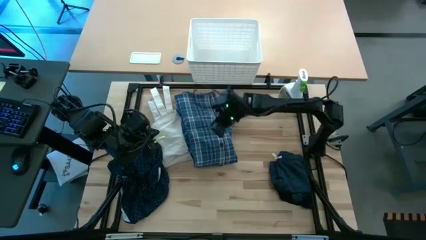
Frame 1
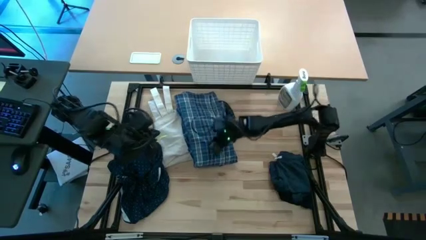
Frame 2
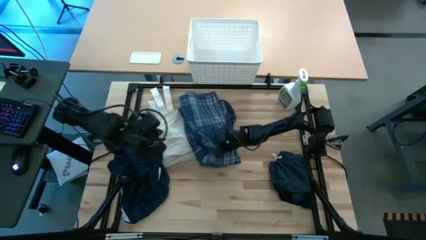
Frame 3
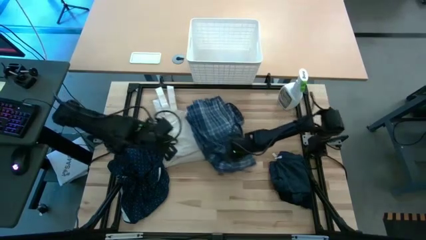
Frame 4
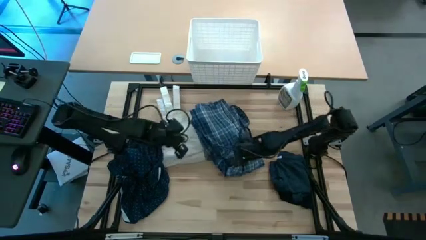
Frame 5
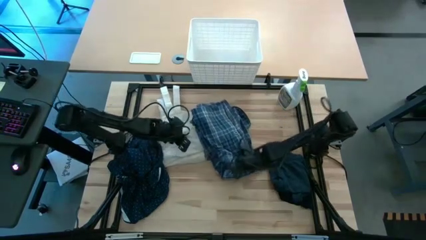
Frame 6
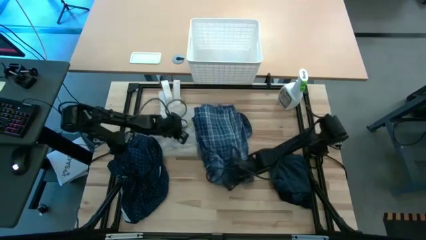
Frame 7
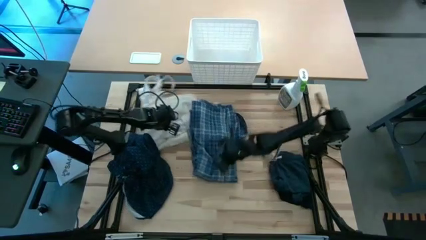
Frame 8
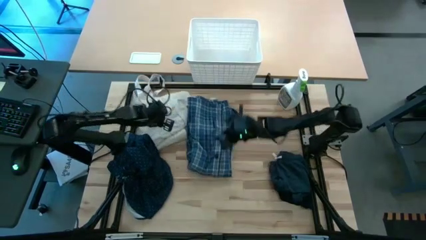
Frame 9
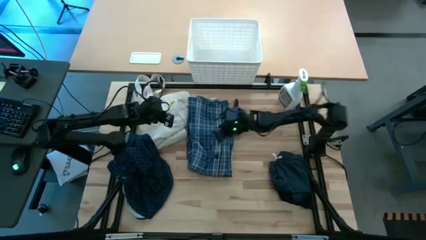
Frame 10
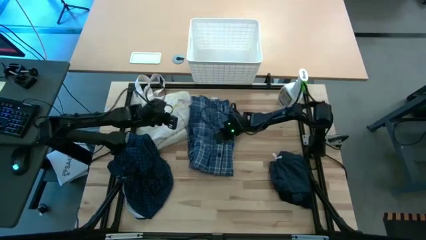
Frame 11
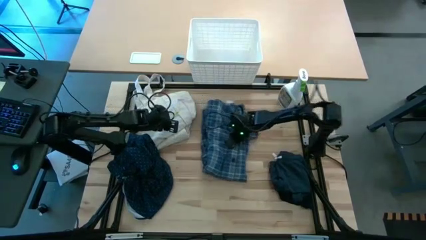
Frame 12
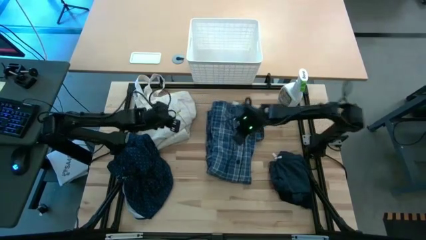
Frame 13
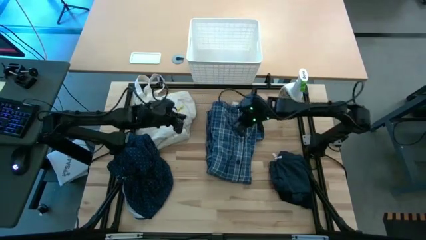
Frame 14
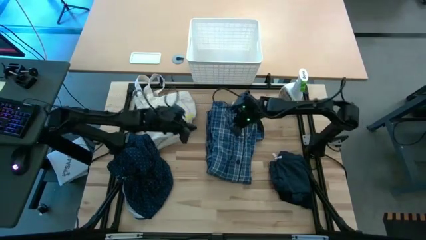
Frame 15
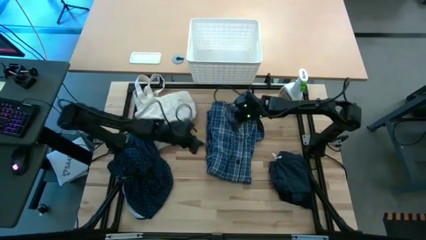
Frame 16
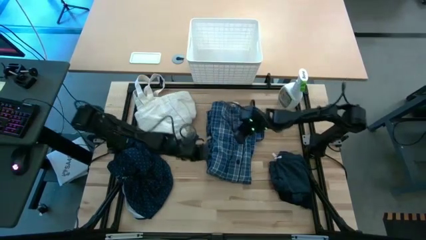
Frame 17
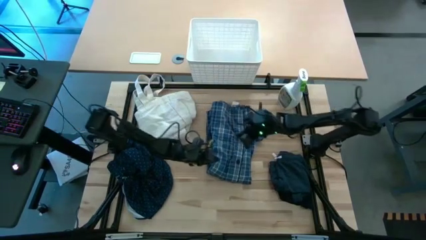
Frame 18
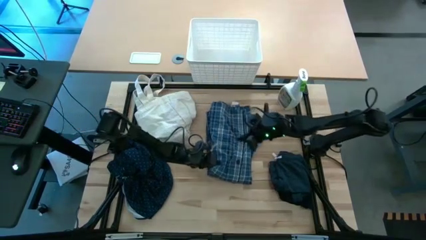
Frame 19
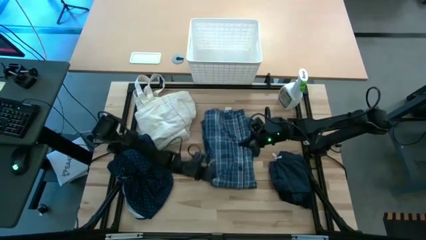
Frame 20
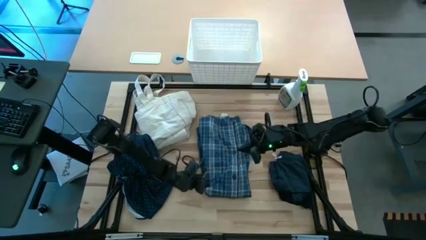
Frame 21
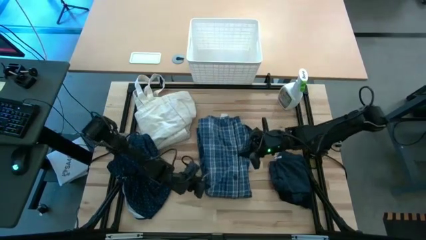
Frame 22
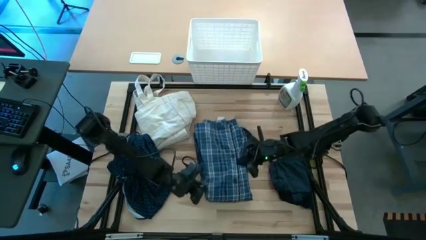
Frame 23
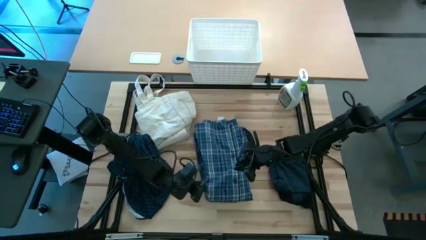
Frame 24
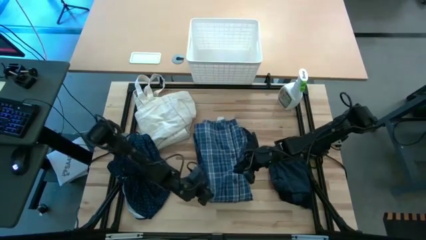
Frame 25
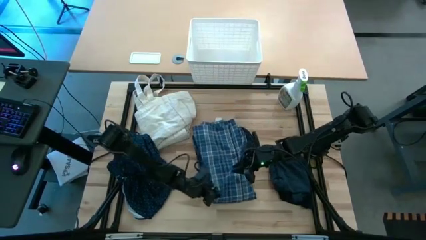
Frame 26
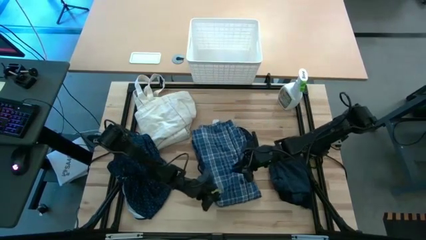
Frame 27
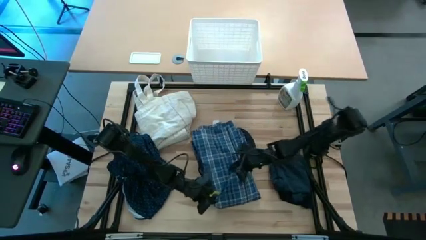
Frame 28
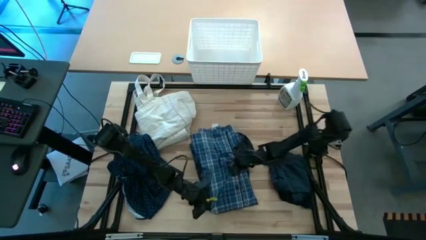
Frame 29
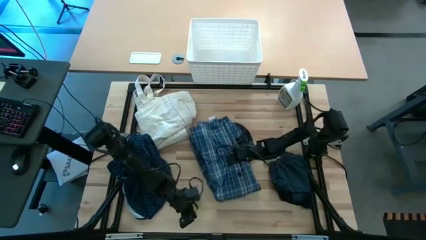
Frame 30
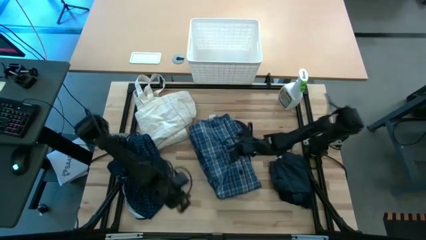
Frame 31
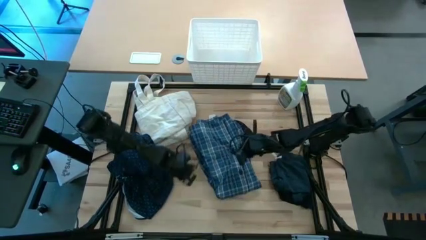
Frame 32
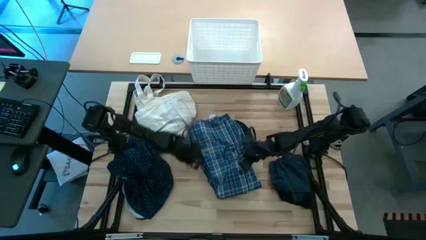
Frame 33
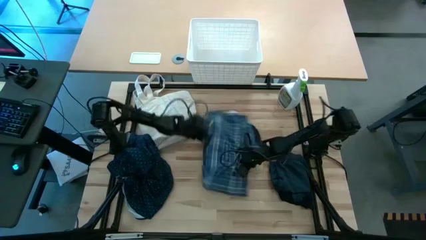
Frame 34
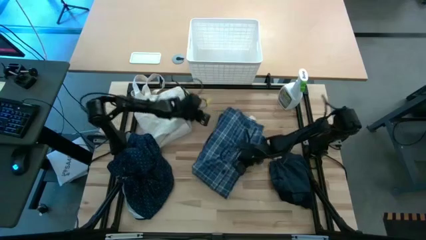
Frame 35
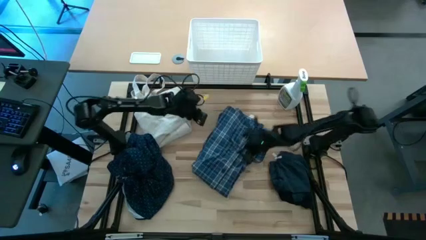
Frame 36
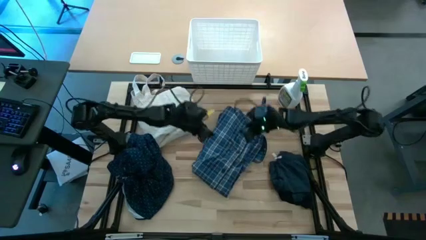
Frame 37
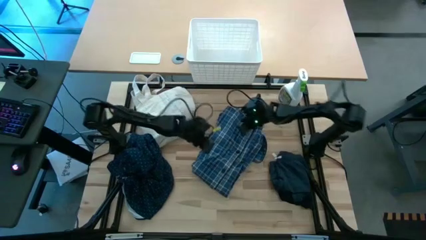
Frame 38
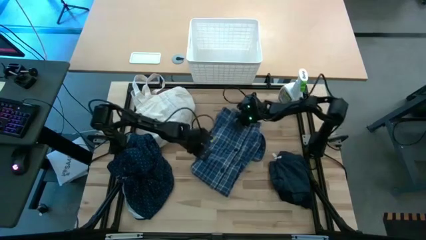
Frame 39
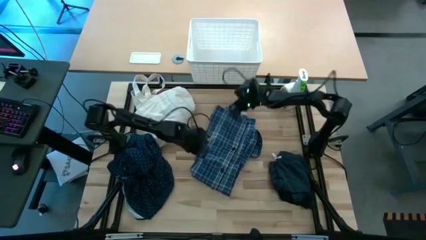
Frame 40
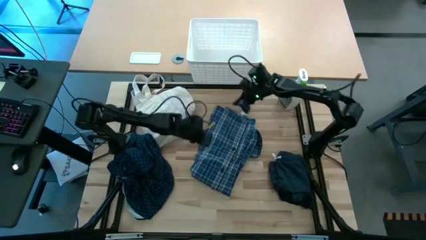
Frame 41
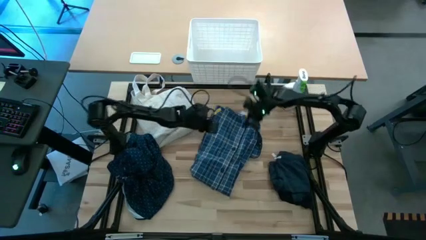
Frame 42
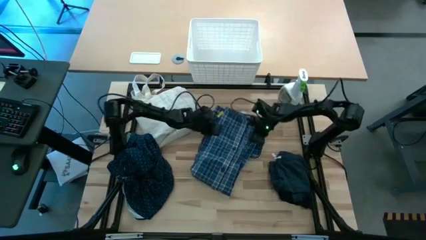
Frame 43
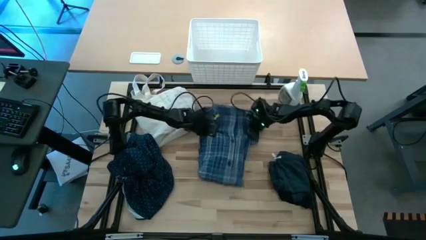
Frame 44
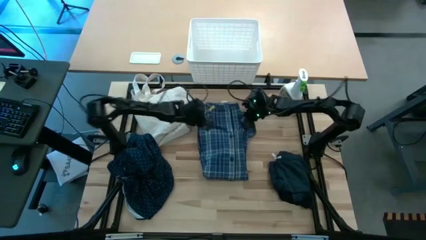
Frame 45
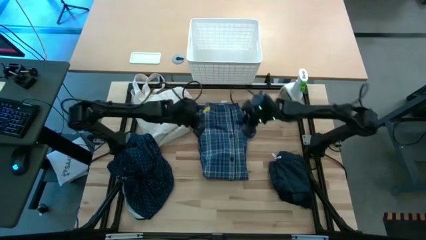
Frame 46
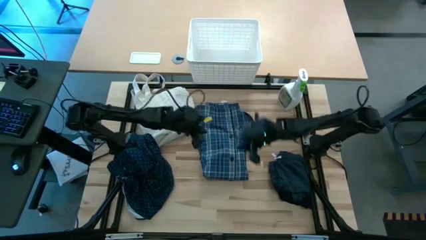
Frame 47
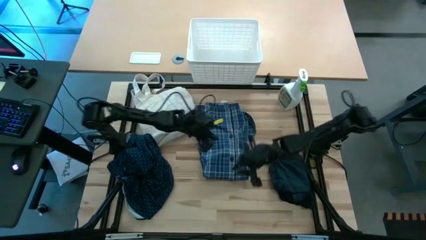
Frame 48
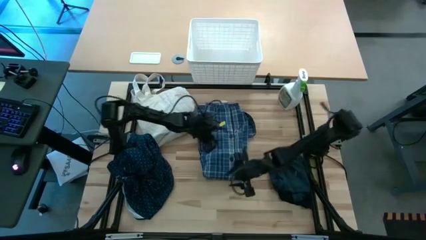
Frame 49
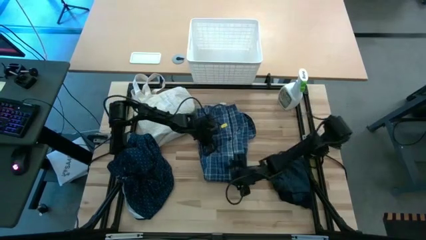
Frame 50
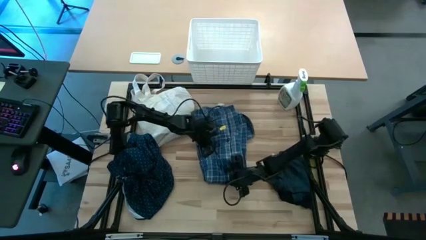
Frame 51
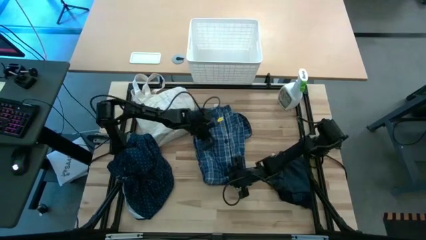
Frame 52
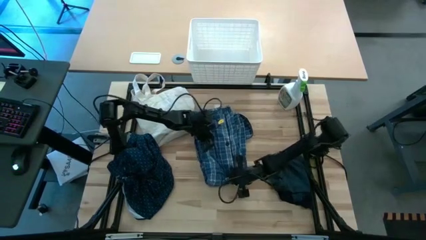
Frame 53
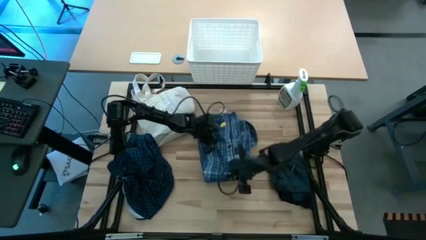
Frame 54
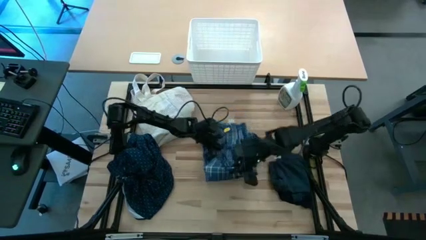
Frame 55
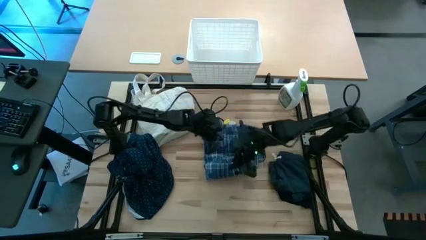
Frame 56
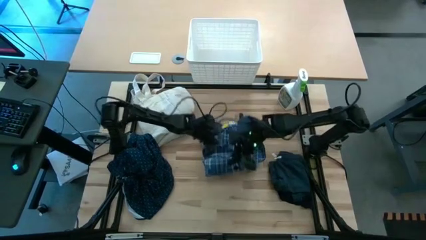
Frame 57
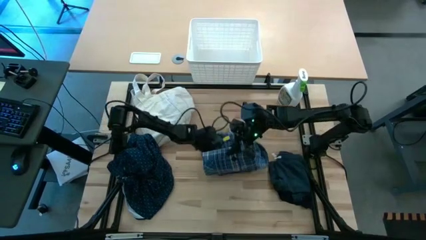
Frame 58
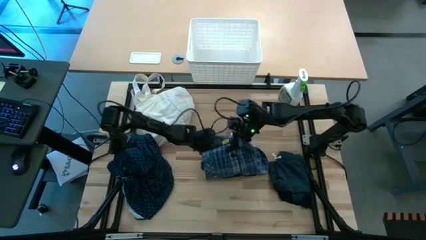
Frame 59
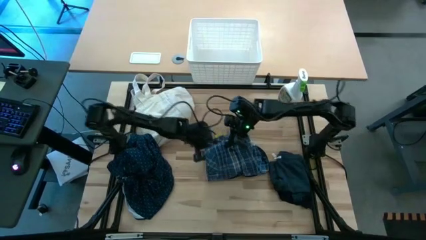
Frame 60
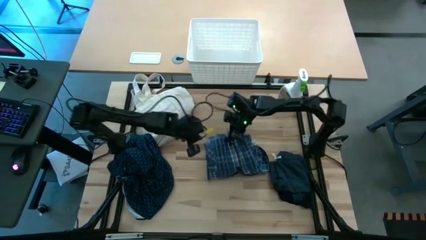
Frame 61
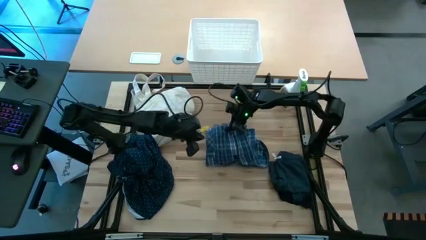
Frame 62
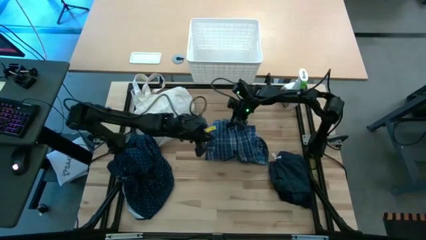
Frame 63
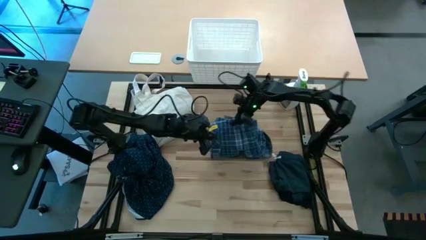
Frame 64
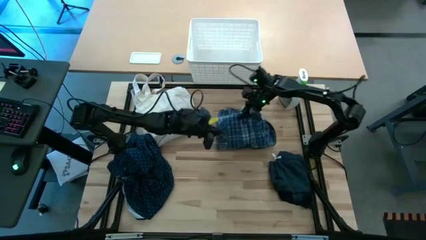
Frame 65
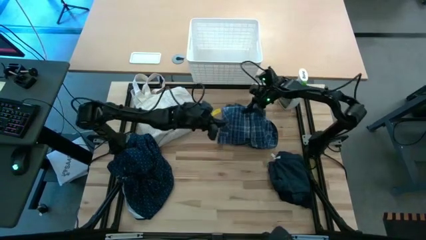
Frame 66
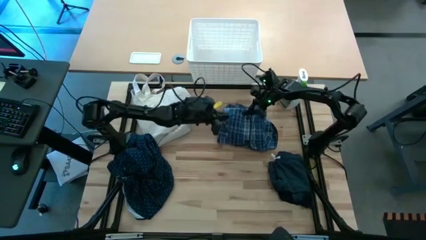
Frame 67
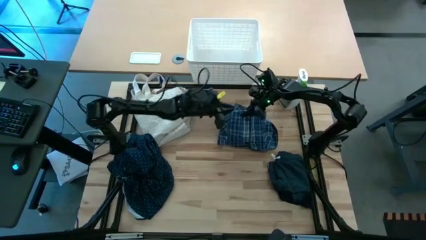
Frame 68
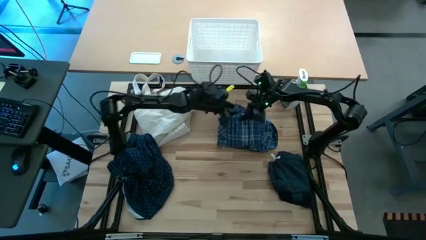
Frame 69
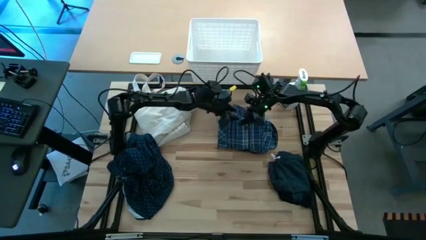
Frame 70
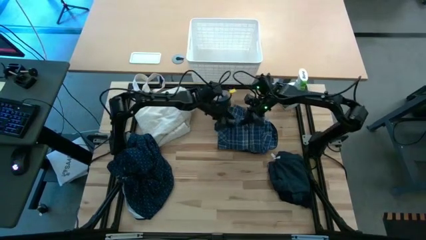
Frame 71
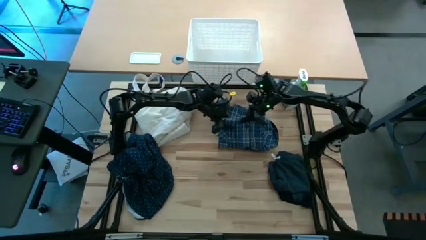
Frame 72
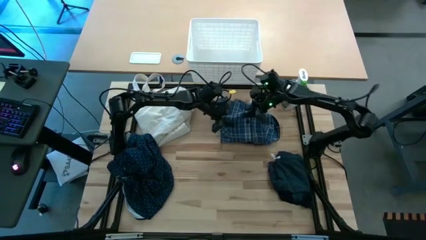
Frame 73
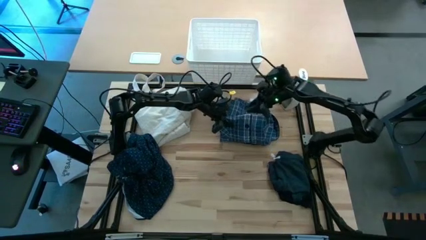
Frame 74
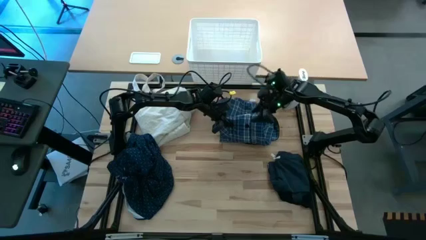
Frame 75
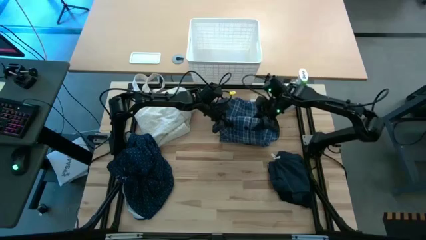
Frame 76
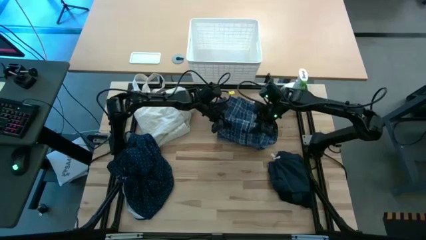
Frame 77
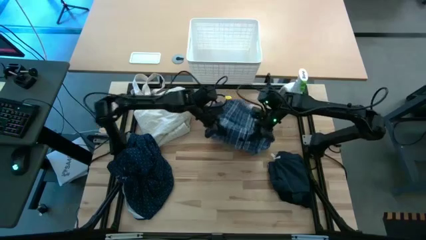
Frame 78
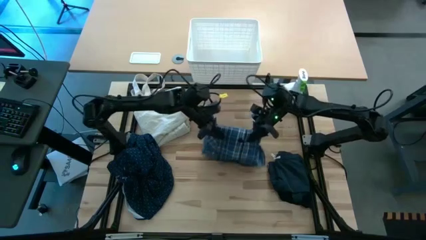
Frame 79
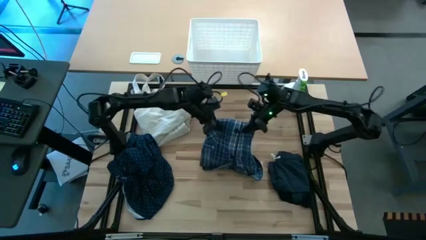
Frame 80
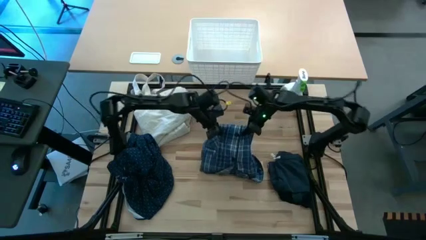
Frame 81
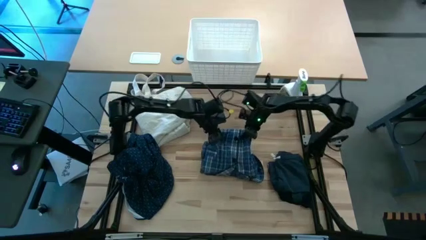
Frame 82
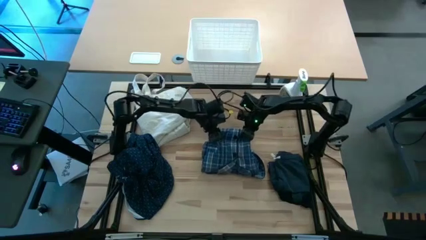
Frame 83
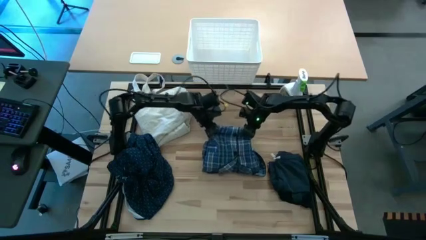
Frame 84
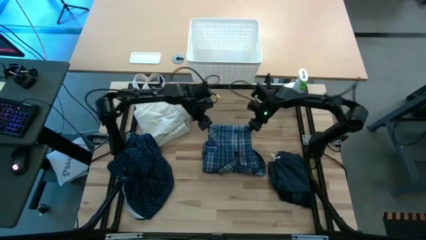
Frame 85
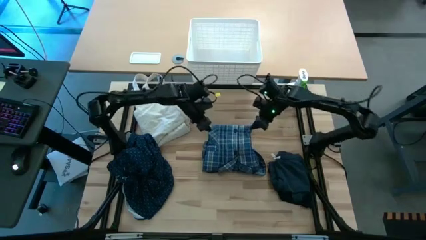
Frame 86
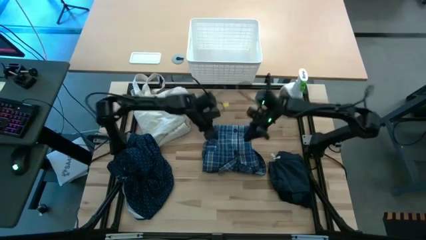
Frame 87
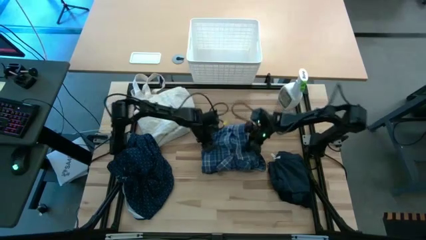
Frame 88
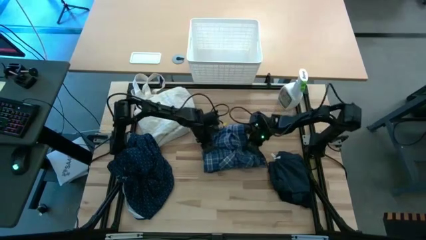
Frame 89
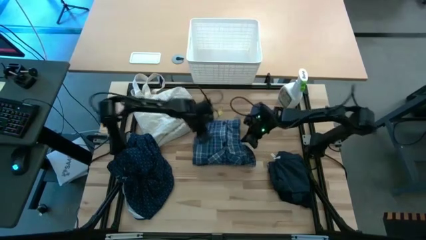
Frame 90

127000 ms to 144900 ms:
Fold the blue checkered long sleeve
